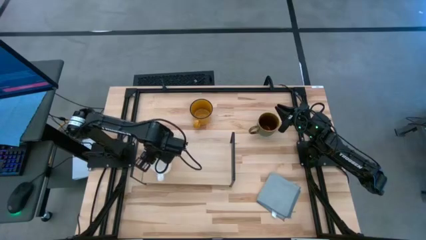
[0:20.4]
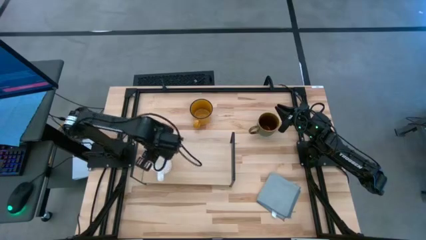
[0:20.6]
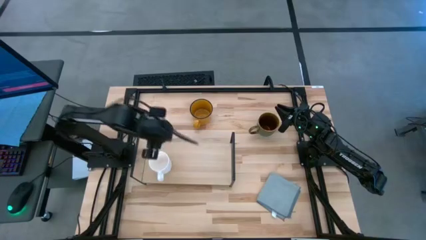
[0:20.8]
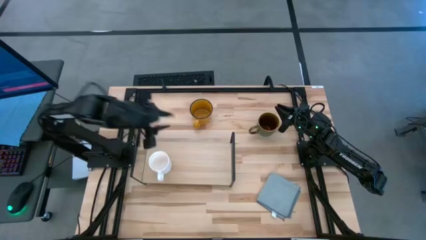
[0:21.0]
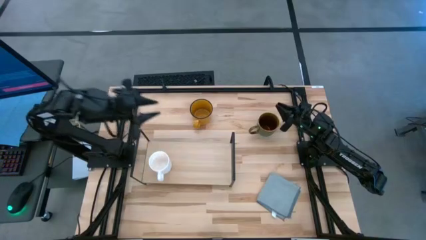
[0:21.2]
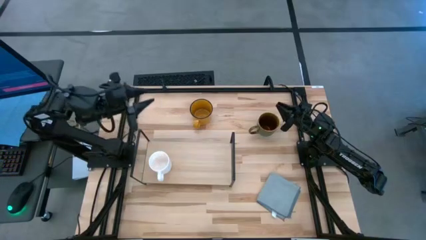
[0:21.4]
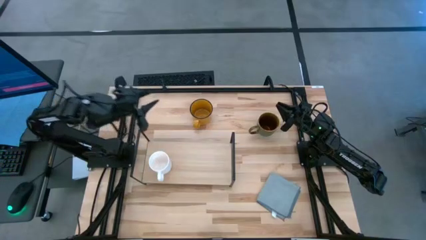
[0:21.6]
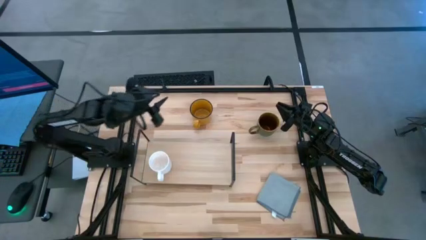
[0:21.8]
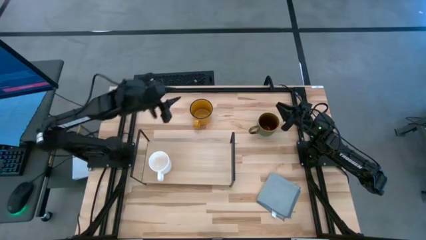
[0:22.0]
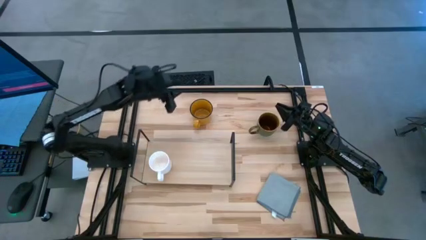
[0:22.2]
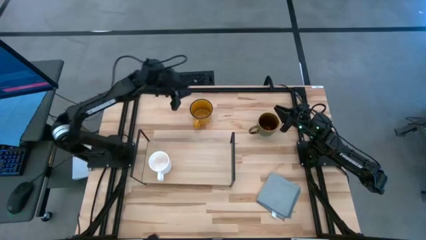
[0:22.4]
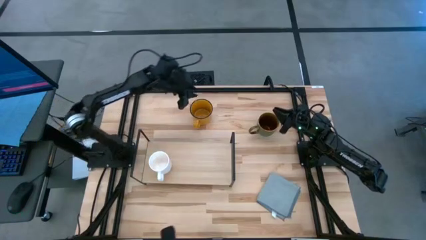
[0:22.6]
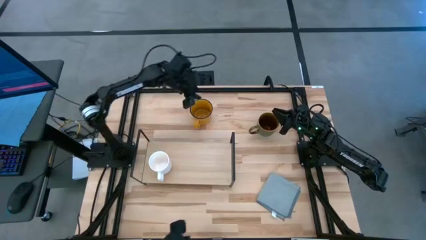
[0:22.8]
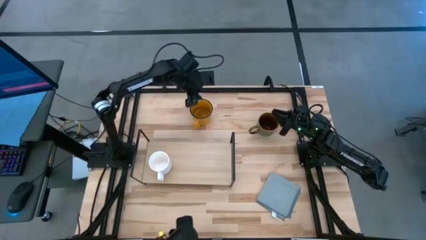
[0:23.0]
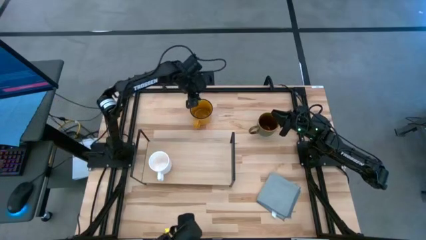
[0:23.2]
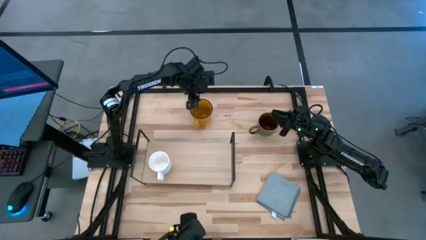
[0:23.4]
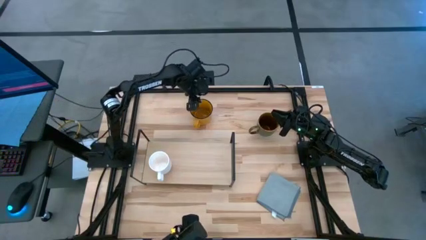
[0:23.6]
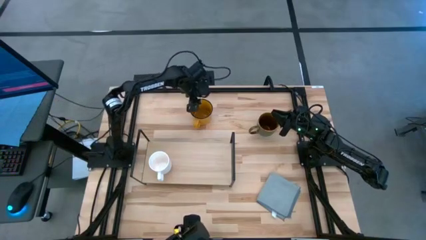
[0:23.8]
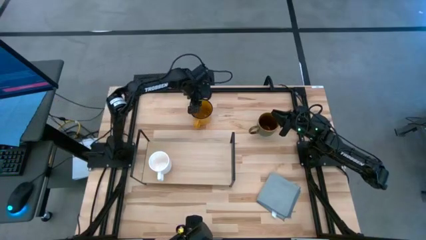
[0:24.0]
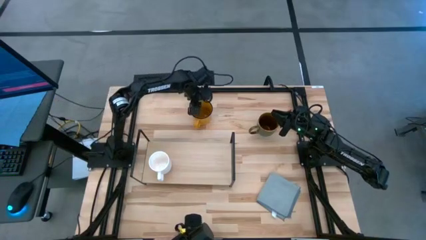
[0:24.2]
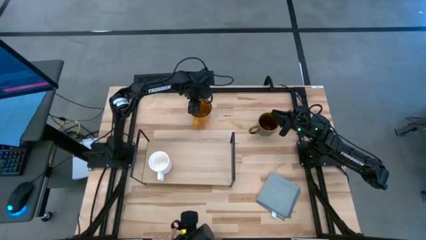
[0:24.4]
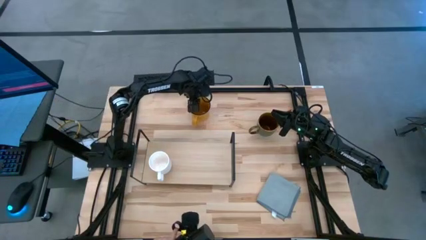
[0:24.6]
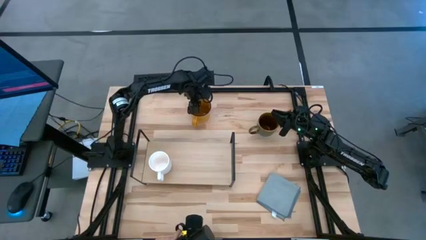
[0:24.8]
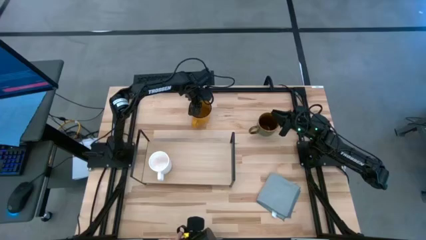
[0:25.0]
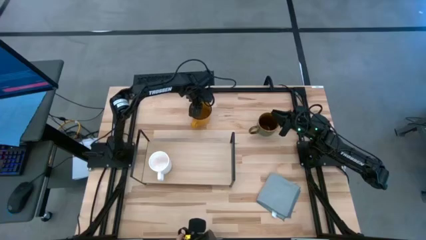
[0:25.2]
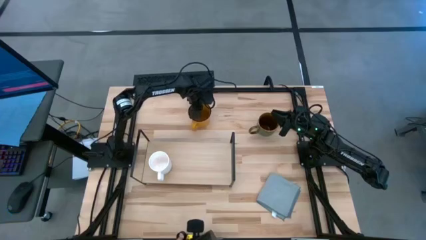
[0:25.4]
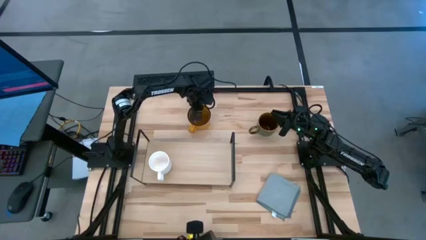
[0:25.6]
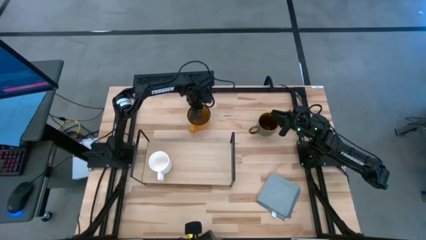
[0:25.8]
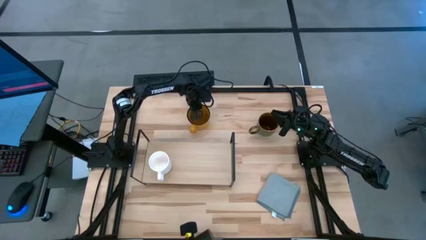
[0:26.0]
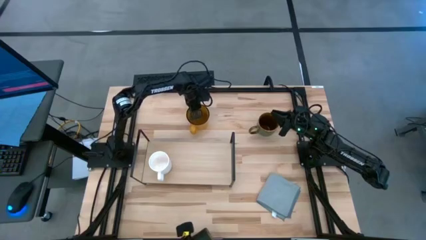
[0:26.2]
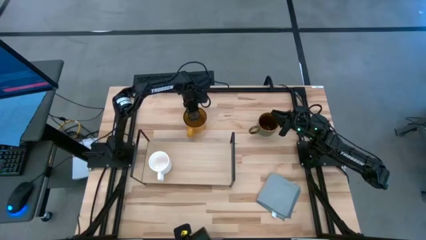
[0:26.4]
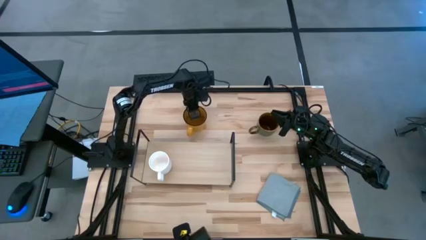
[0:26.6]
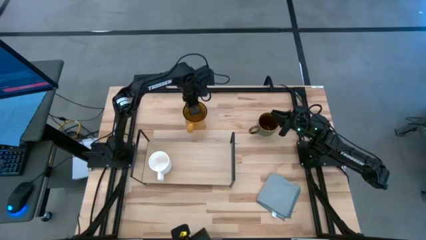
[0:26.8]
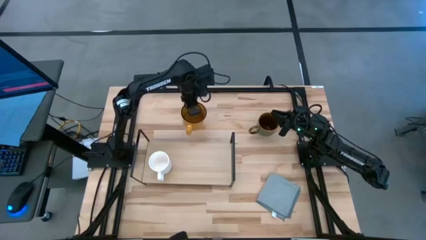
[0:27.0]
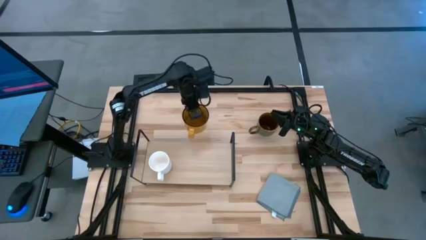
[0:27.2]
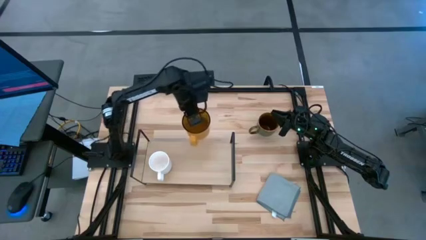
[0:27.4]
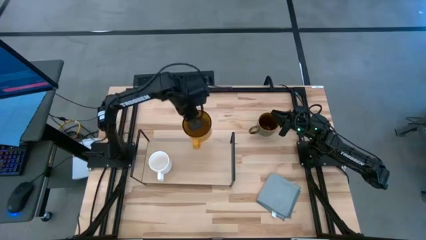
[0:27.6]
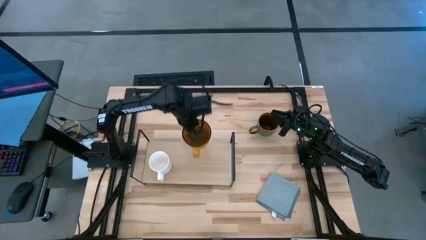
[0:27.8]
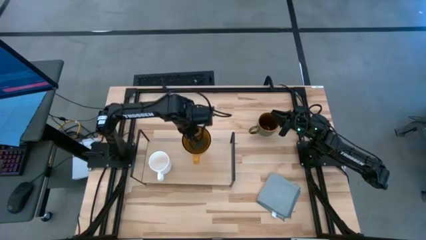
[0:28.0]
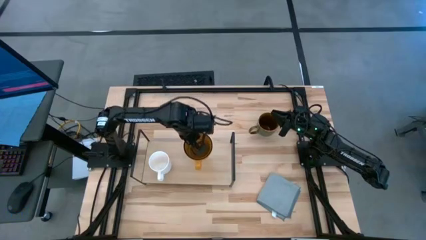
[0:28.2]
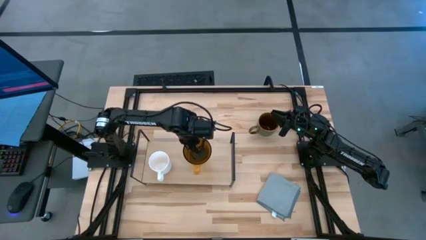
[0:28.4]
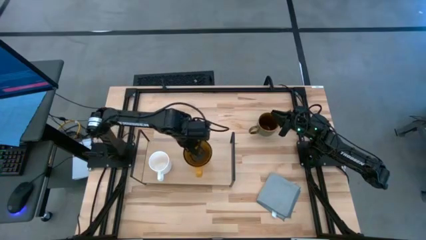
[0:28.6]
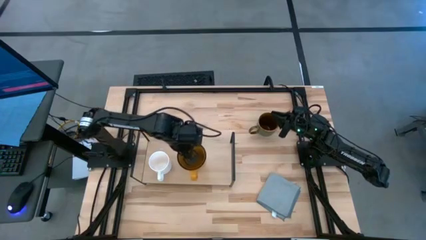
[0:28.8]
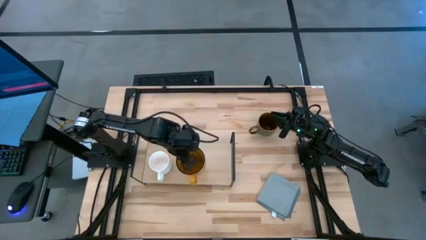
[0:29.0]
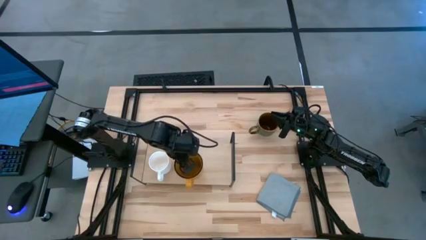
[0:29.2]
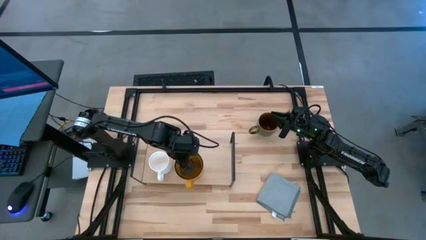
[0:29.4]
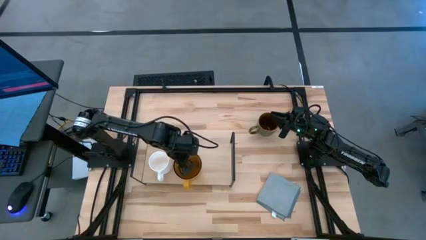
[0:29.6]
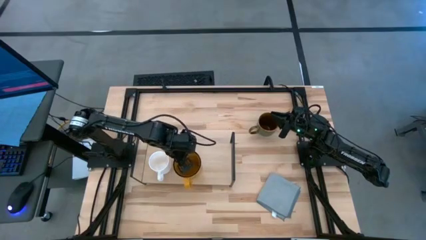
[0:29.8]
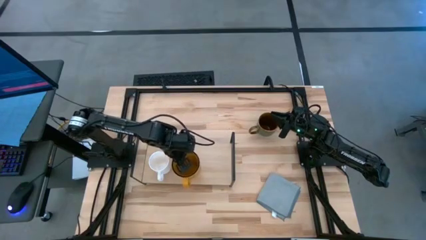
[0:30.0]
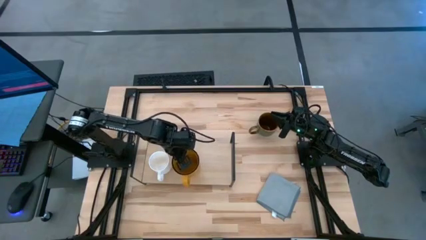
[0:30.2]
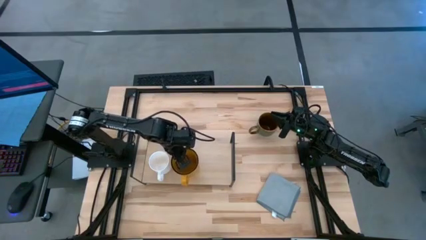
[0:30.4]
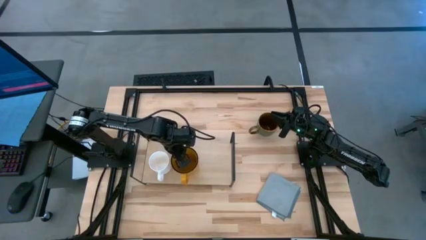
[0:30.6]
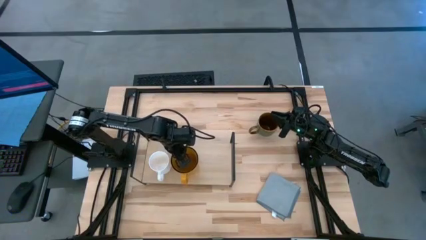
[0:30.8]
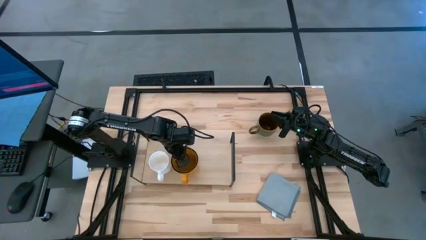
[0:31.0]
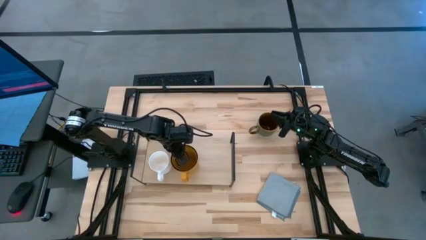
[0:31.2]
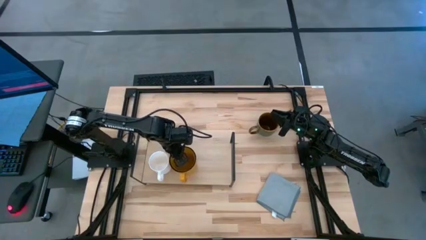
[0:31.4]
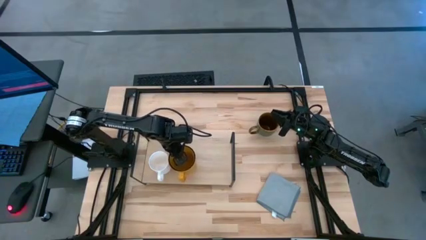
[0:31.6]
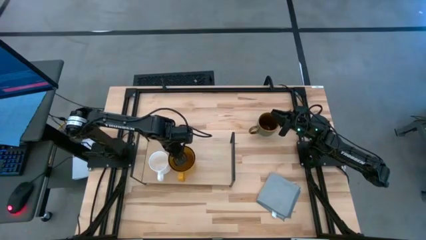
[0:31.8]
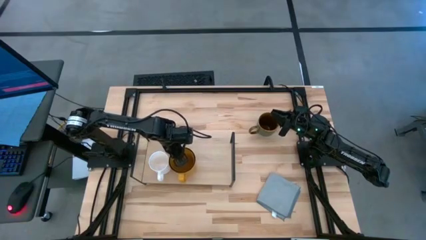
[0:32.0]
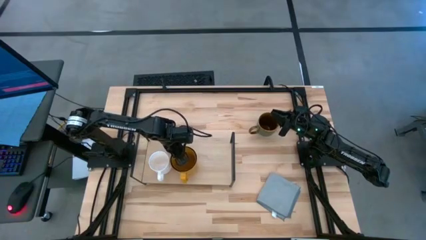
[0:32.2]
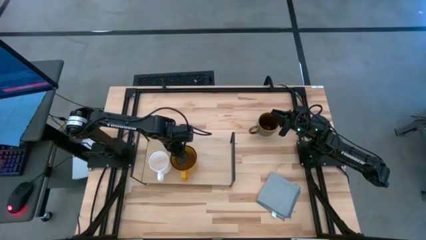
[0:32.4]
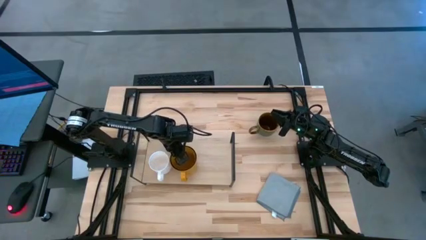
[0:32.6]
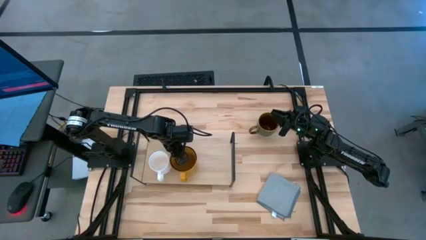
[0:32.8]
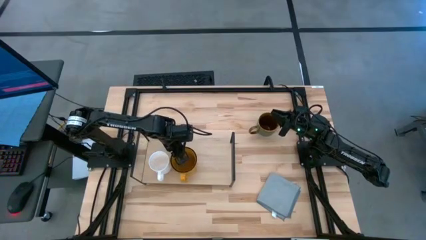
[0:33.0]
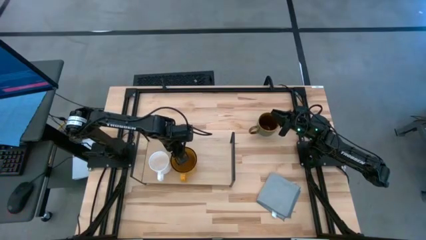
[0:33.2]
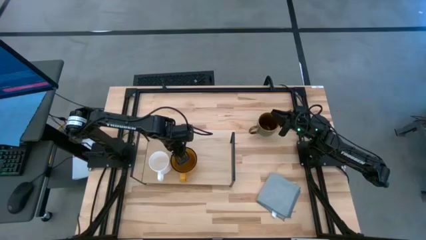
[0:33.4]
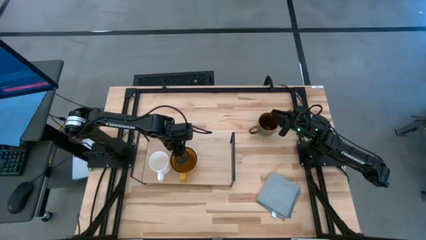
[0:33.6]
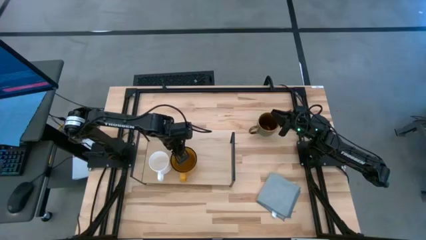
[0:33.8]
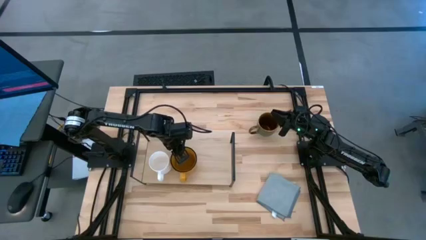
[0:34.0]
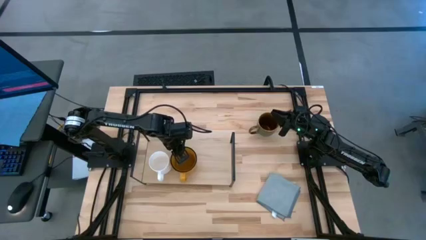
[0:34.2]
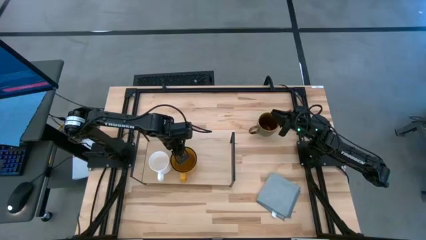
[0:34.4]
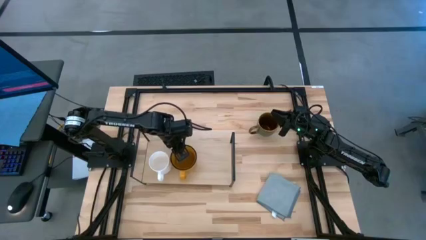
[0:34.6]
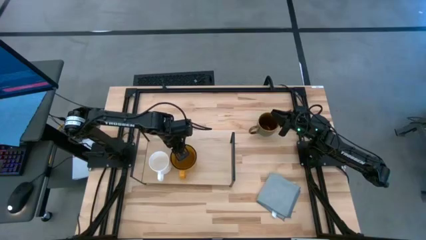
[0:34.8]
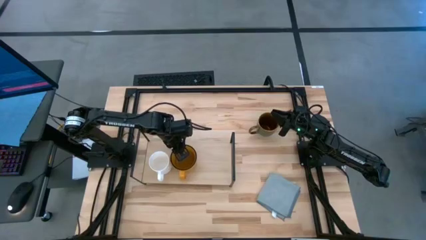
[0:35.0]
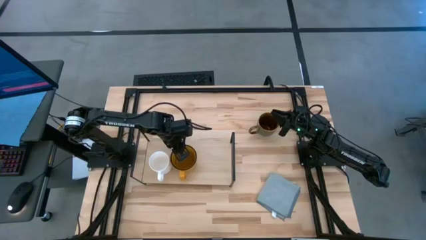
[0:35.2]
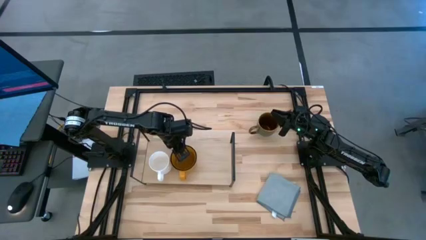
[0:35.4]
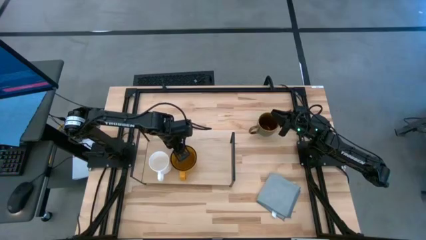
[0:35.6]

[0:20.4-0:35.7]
Task: Stack small to large cups/mugs on shelf
Put the yellow mug on the shelf

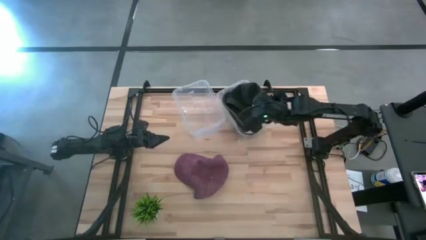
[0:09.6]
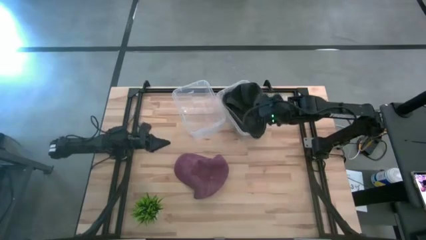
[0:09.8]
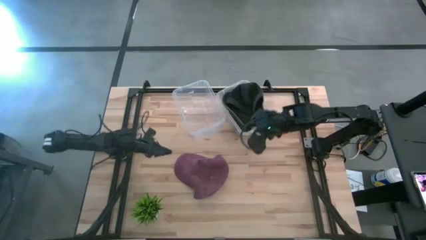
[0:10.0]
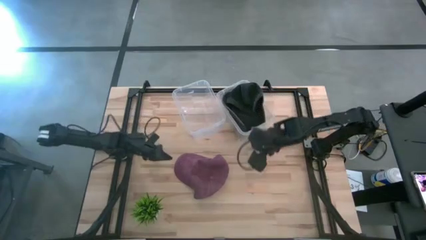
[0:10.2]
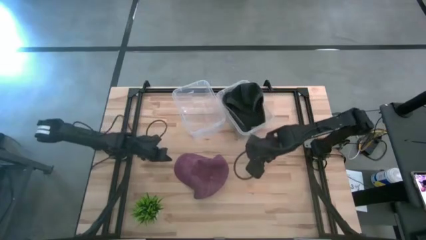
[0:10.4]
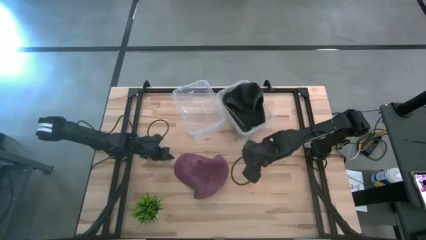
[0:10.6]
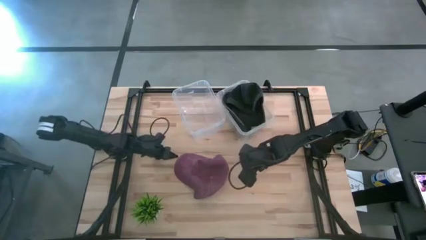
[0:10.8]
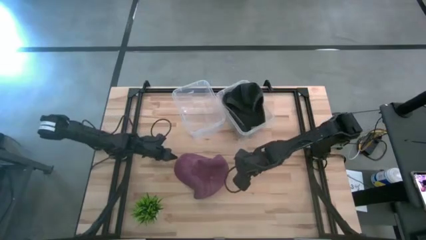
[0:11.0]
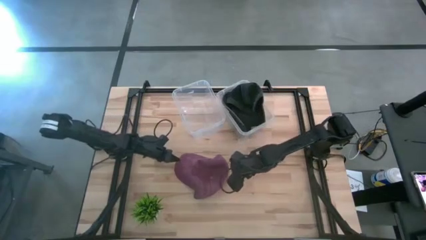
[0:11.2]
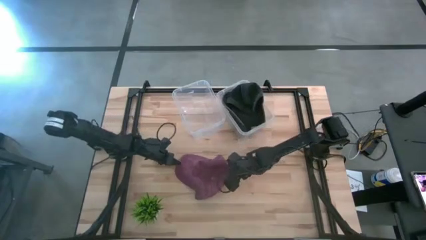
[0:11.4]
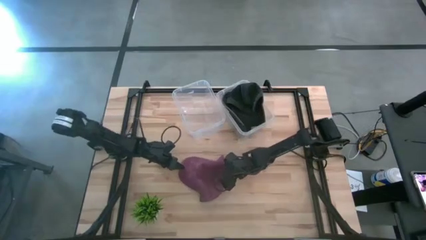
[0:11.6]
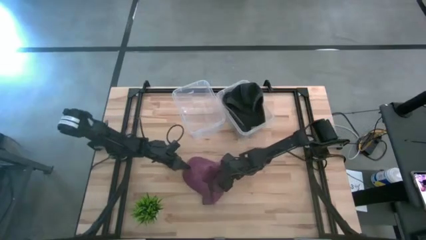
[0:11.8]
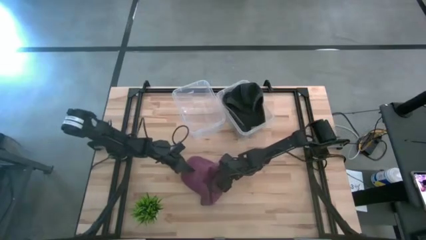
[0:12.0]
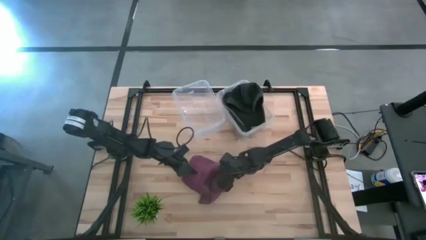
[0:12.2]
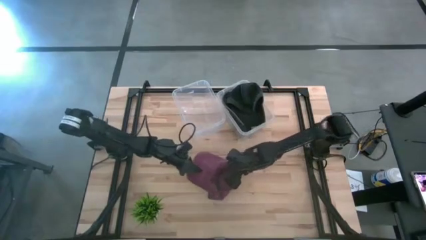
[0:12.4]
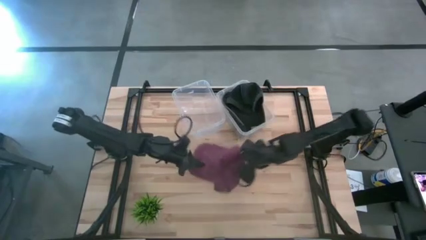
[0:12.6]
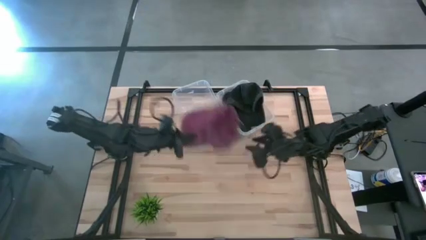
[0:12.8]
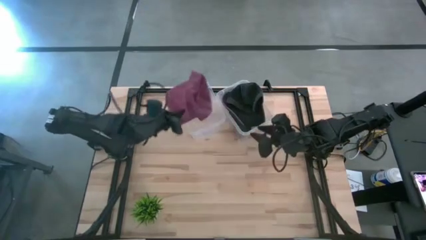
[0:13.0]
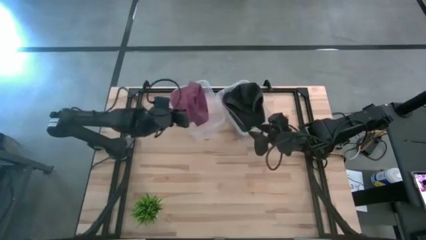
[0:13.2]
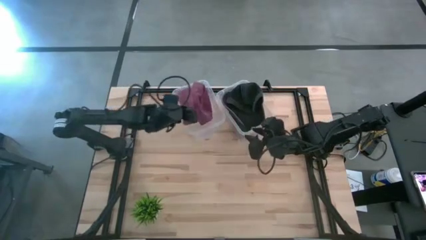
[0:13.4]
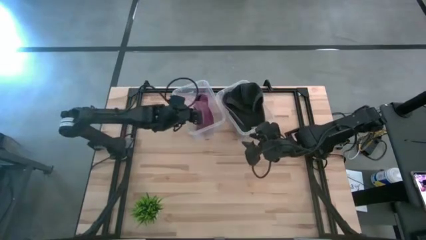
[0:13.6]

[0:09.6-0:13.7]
Task: Pick & Place hat
Put the red cap into the left transparent bin
